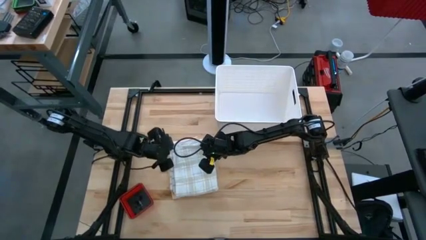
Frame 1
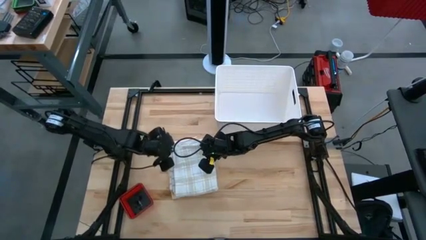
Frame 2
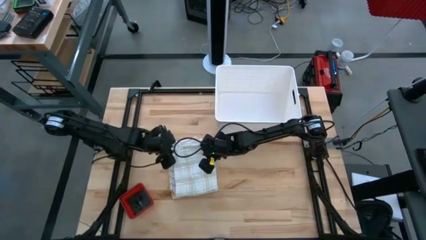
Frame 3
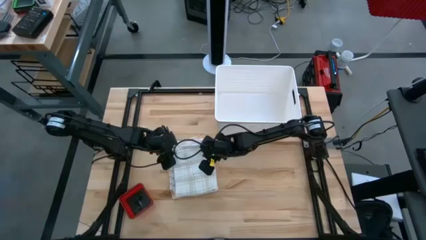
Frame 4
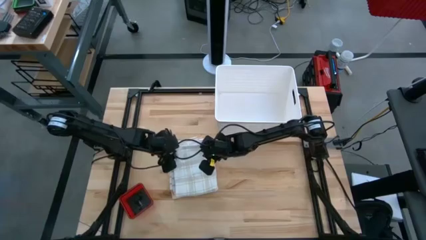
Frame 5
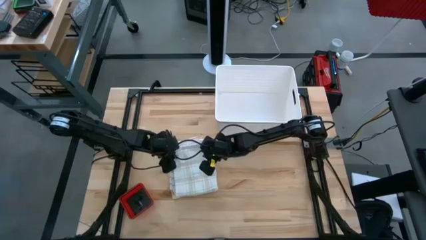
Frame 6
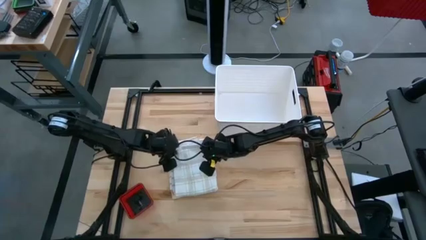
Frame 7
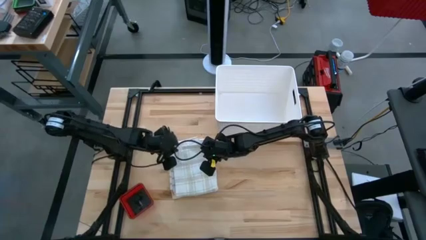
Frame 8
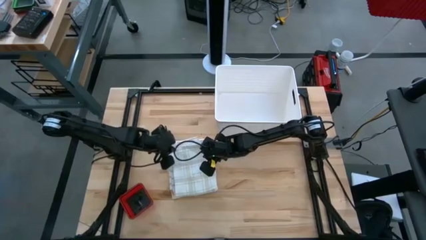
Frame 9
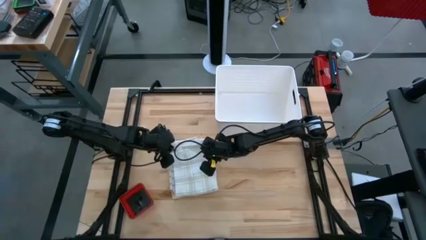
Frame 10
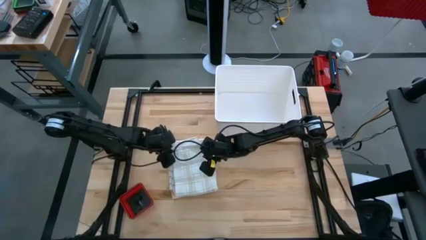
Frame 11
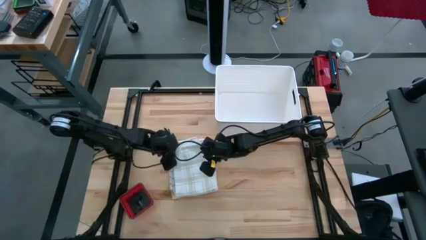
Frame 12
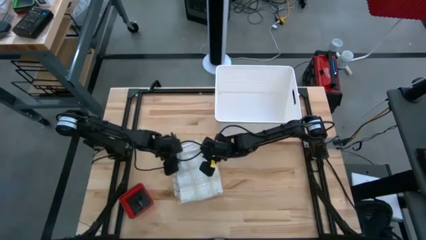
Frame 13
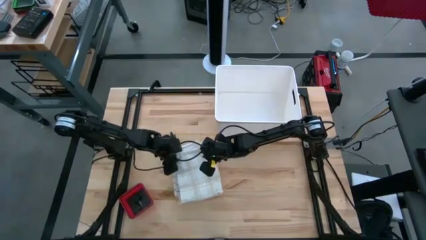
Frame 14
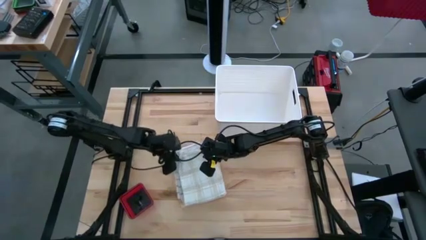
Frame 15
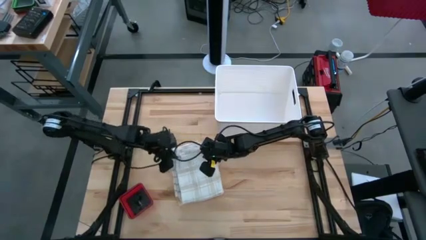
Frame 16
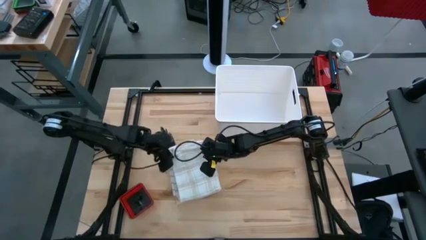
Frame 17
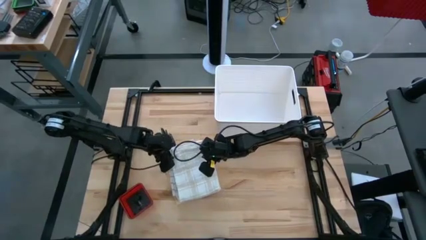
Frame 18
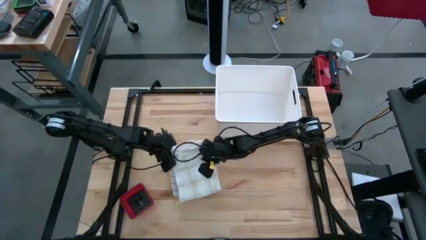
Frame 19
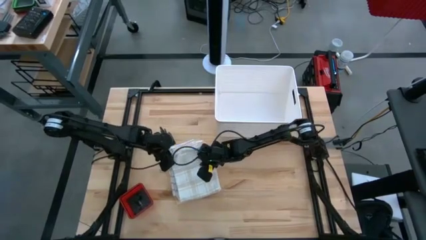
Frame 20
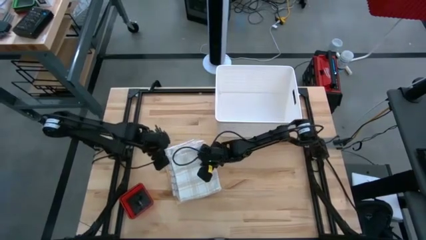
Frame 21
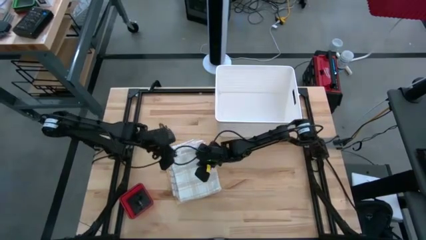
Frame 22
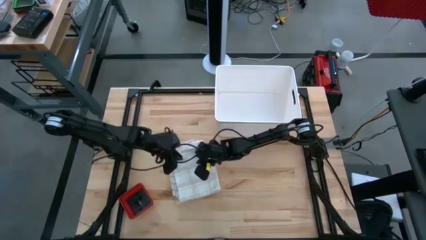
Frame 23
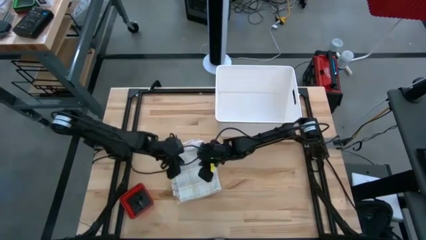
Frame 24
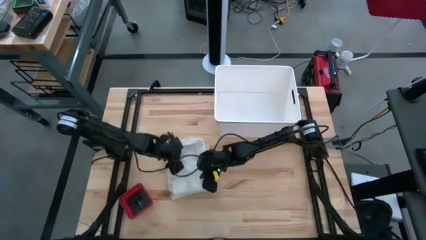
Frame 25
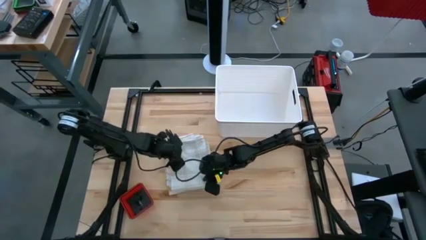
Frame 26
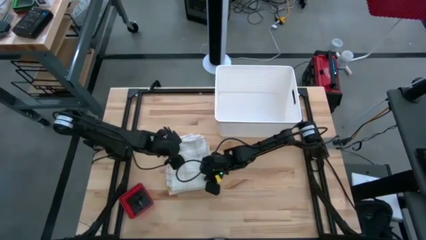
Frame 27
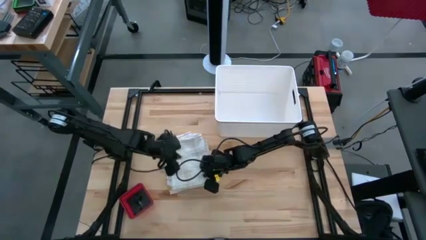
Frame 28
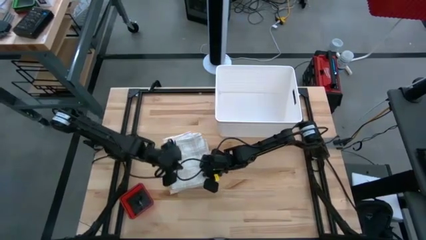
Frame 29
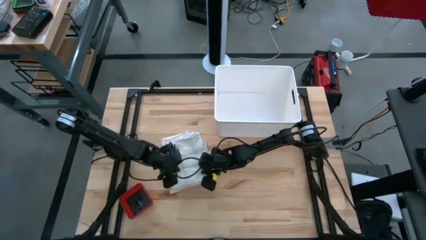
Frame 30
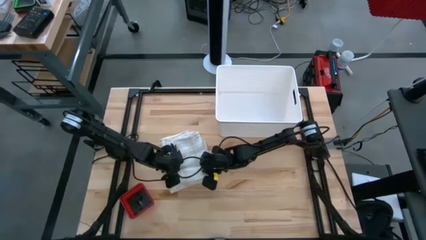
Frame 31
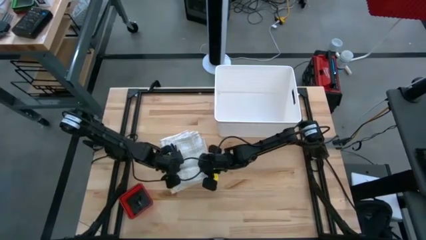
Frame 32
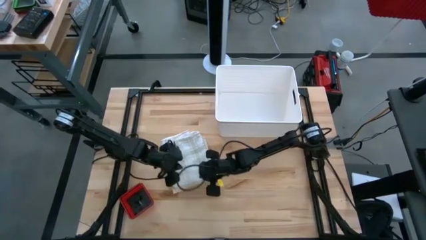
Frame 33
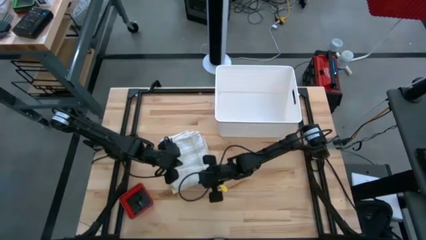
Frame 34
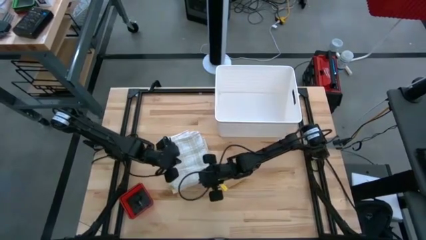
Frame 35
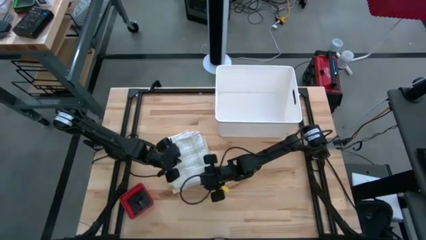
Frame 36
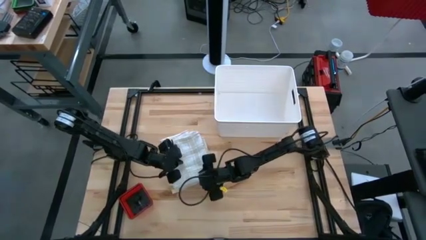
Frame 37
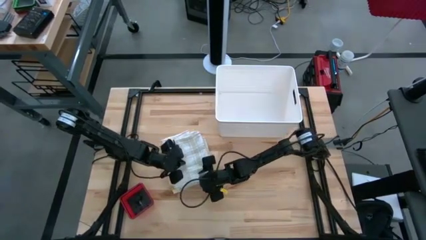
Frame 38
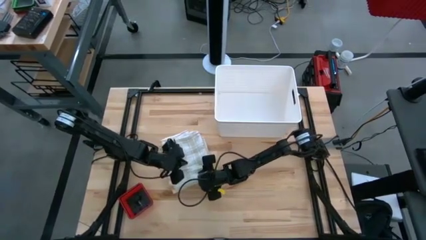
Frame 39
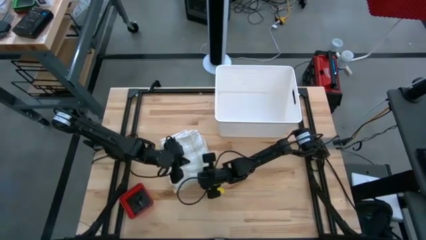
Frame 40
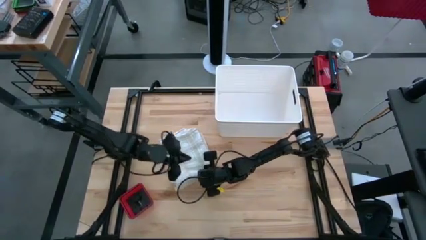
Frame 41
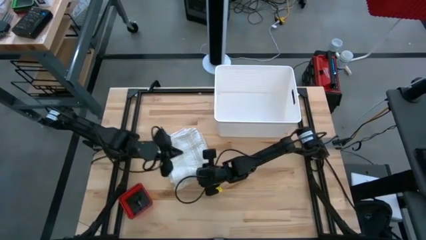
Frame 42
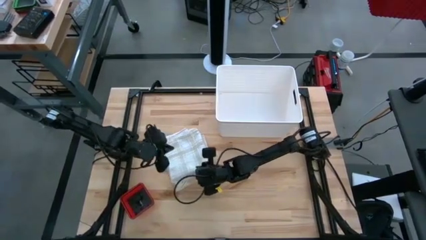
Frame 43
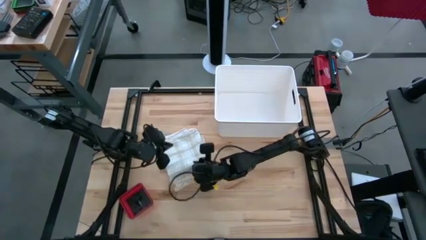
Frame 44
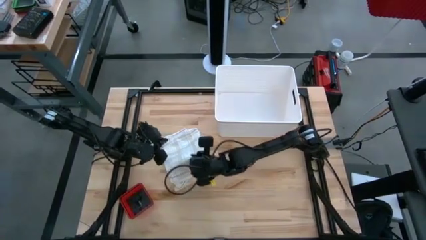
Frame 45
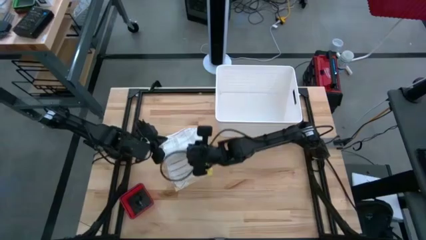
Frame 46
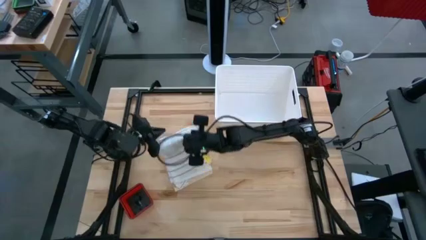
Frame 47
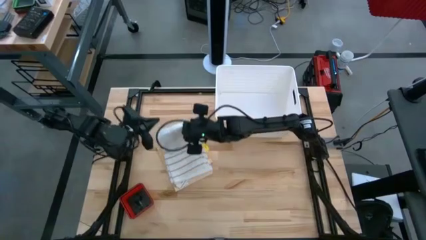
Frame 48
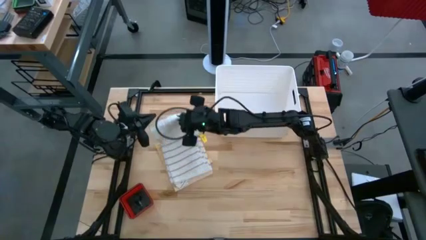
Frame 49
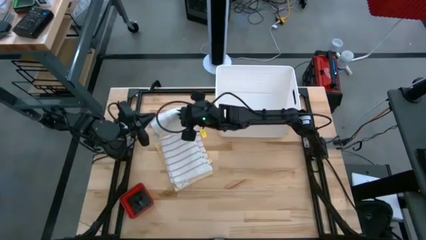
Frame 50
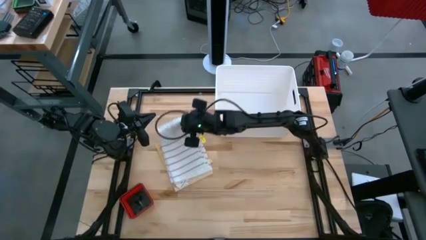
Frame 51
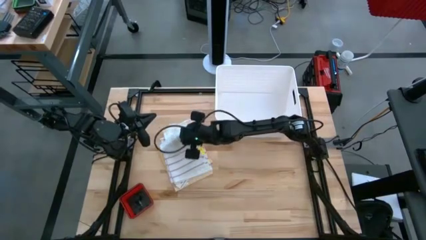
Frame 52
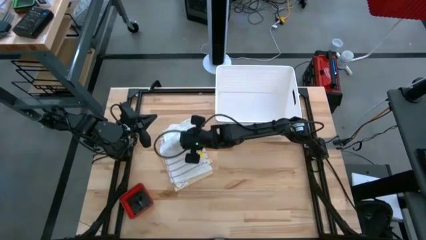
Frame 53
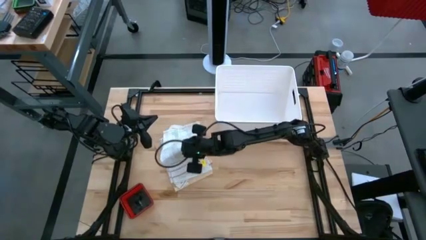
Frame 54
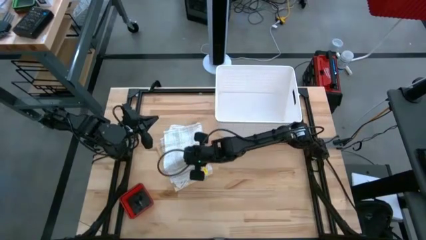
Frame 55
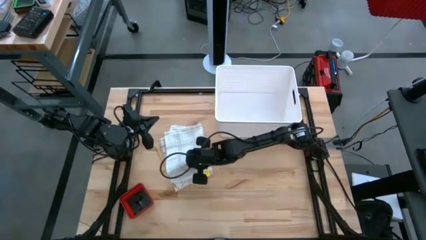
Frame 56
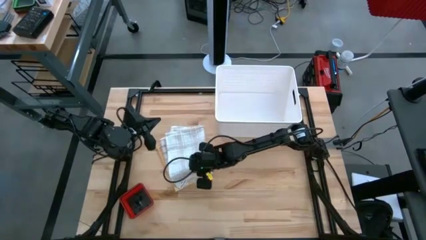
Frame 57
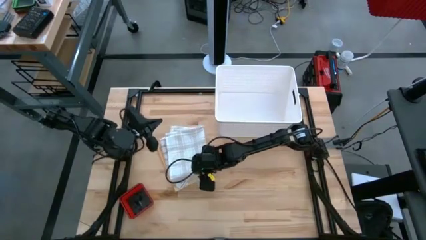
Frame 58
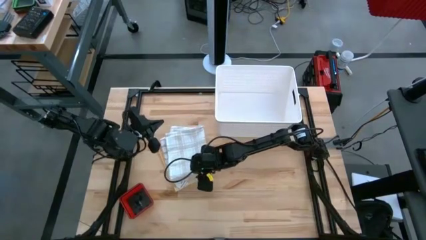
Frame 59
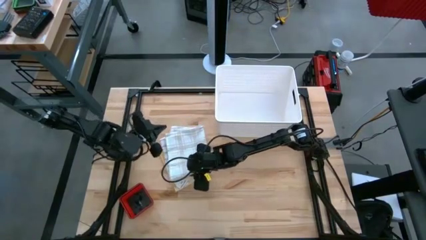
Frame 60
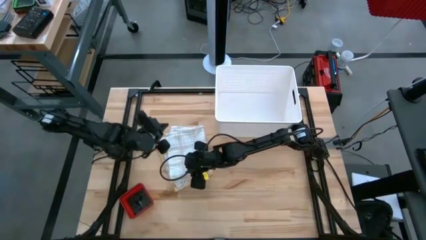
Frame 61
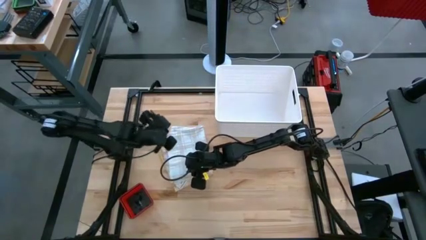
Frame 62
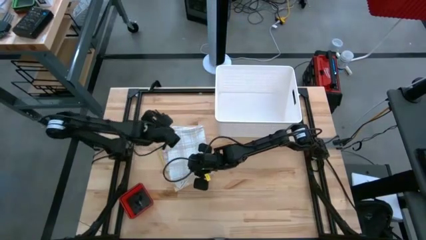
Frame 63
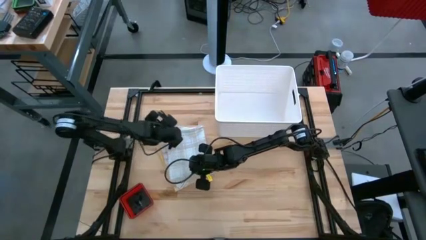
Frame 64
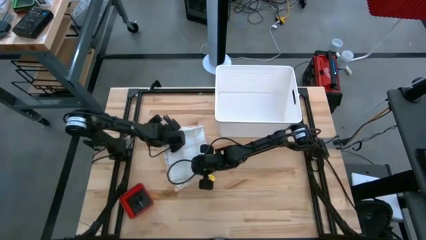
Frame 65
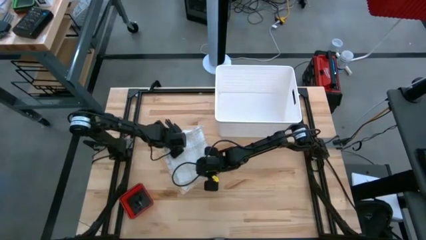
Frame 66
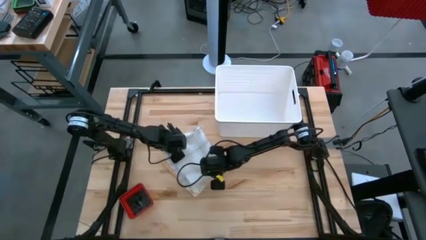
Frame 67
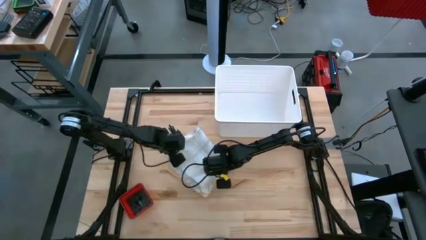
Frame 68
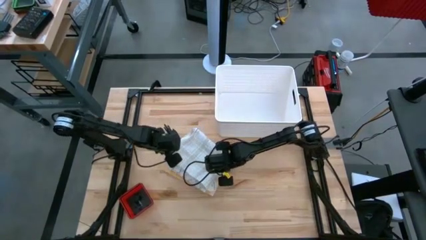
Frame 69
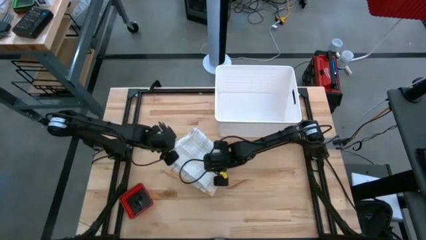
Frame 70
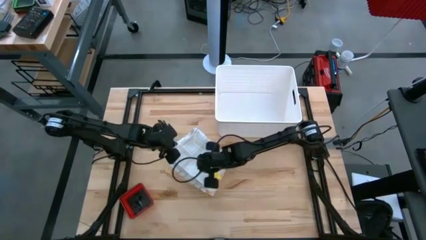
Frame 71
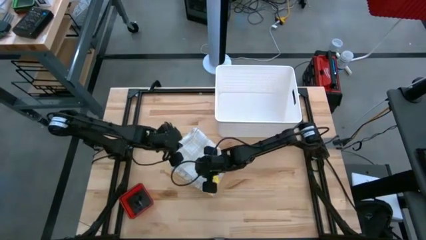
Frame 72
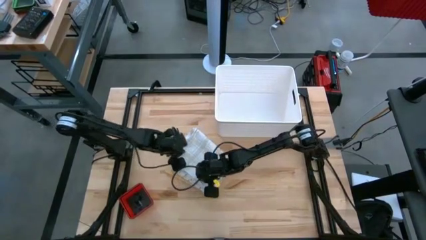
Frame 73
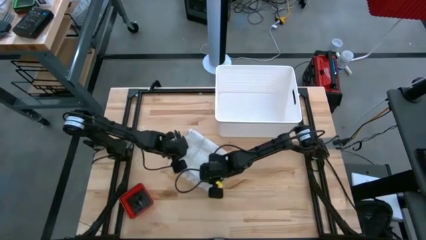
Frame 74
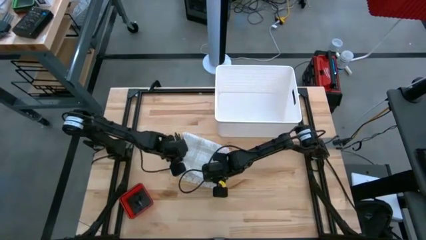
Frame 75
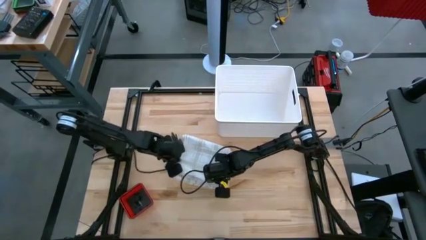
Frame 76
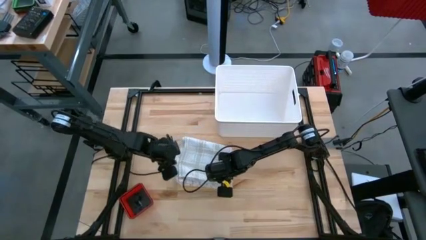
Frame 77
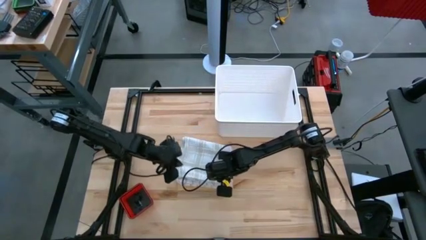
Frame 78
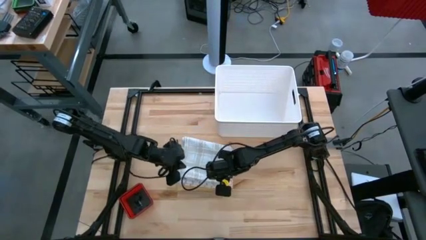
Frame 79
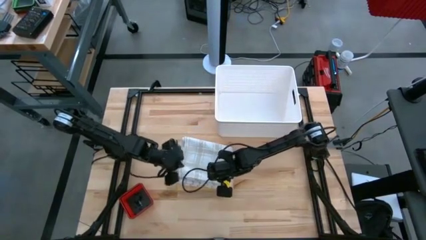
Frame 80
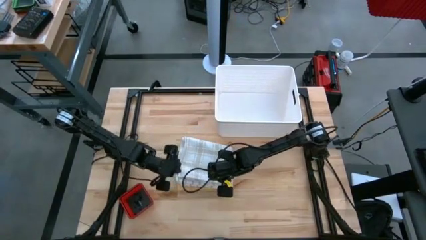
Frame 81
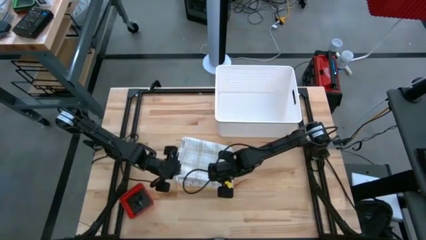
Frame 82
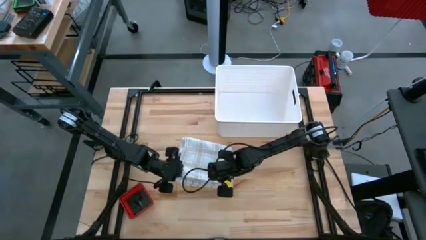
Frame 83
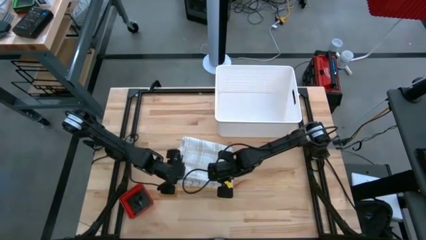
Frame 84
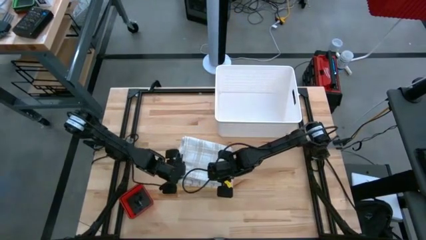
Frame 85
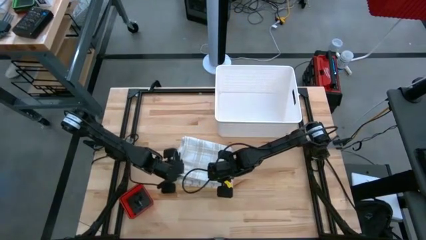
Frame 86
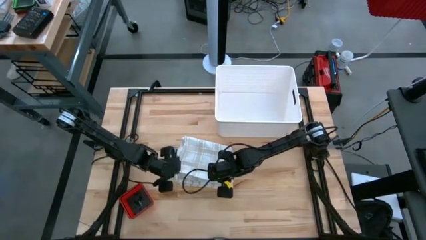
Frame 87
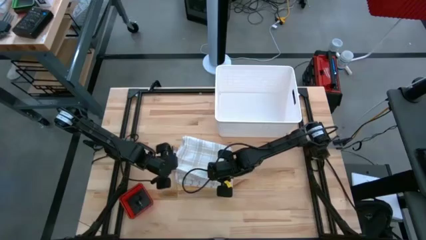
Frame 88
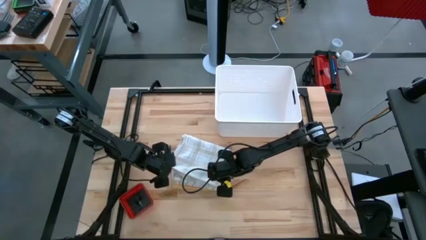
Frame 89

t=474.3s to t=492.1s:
Task: Fold towel
Stack the light gray patterned towel on top of the brown patterned towel
